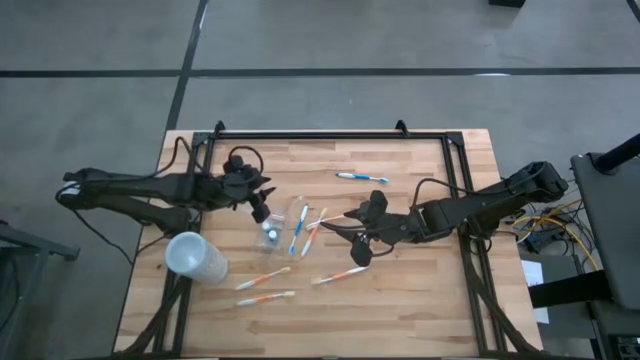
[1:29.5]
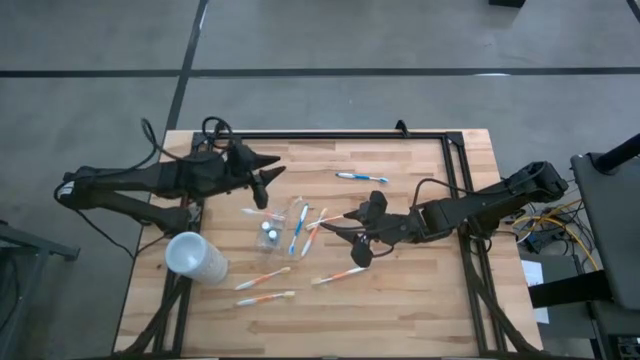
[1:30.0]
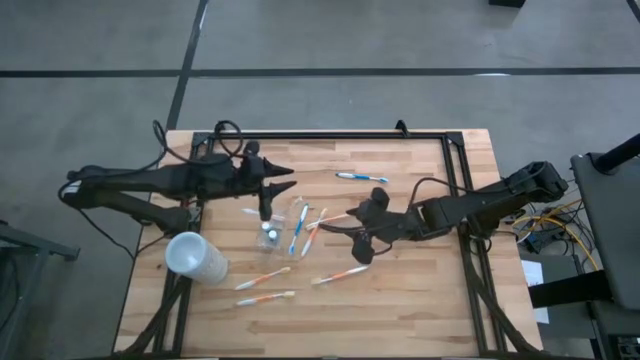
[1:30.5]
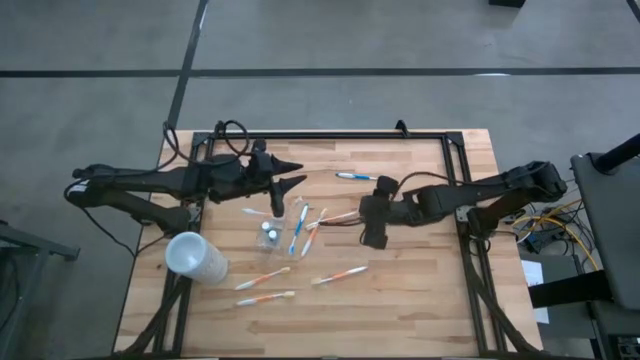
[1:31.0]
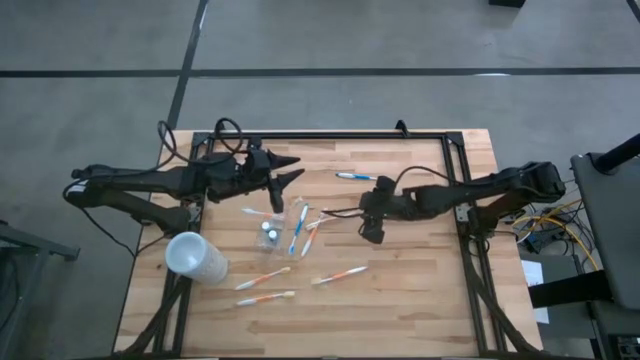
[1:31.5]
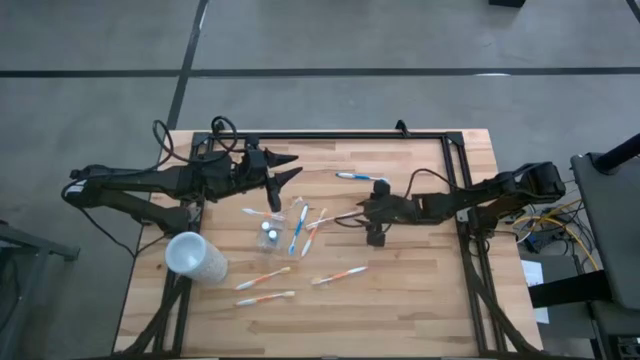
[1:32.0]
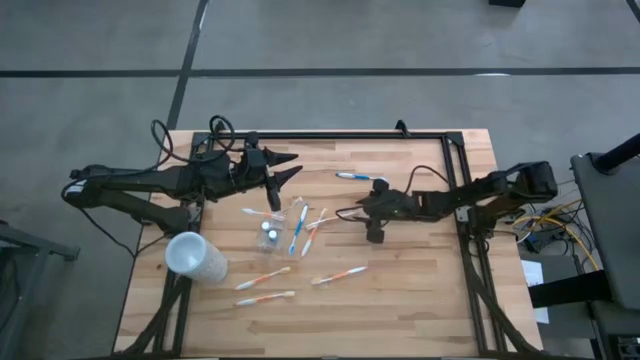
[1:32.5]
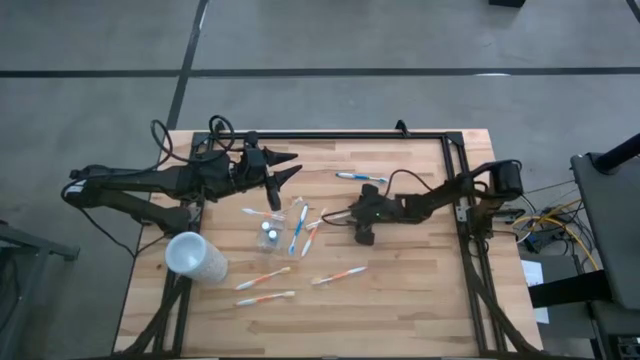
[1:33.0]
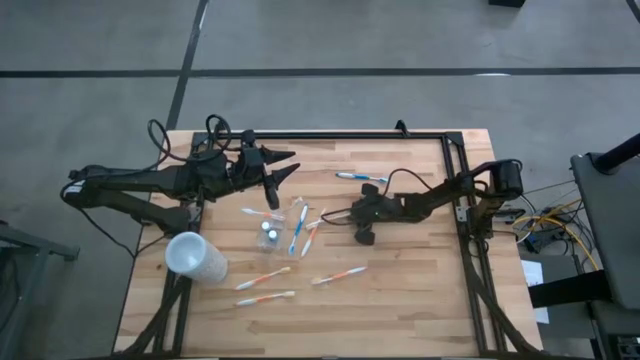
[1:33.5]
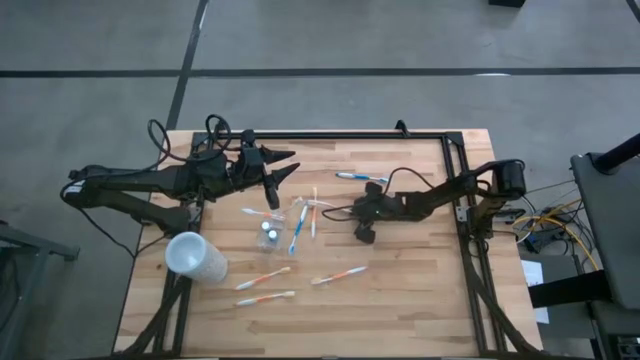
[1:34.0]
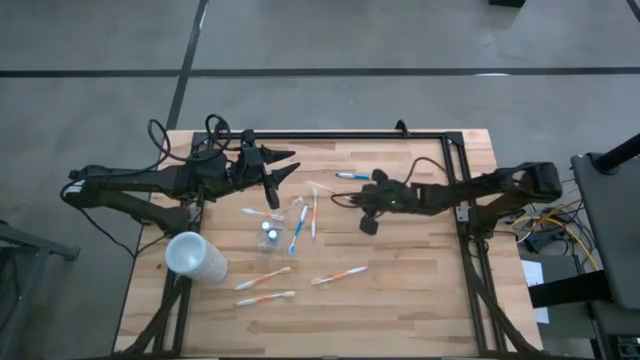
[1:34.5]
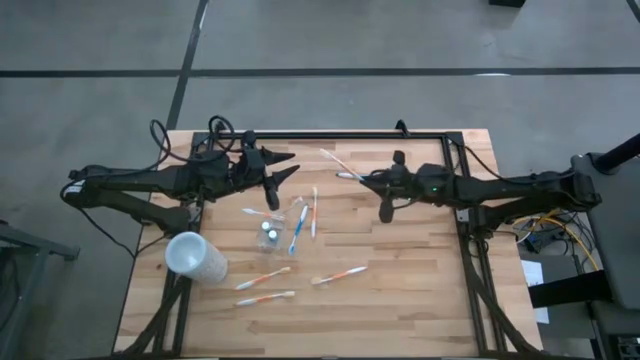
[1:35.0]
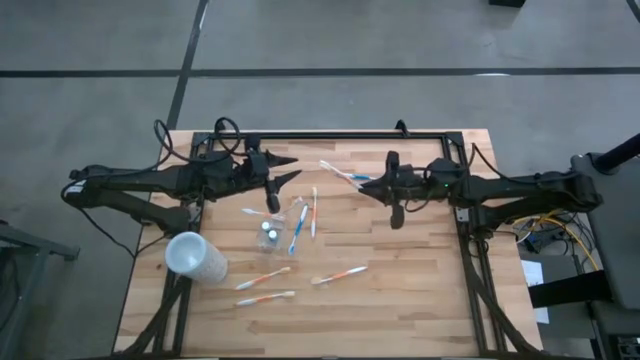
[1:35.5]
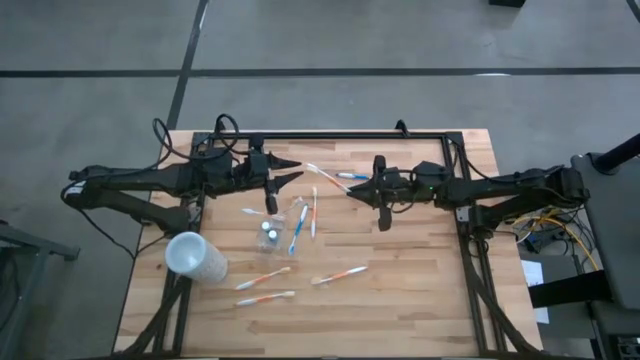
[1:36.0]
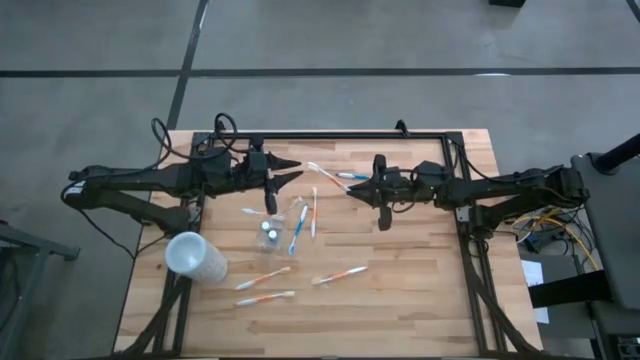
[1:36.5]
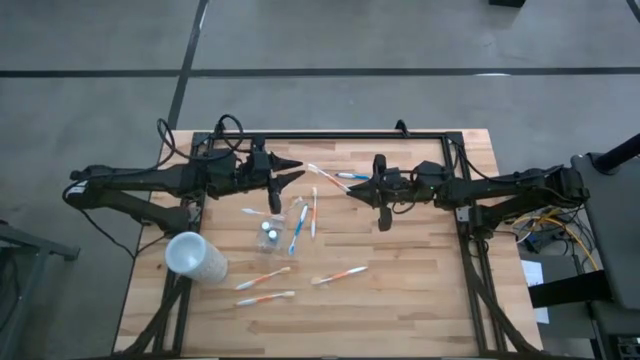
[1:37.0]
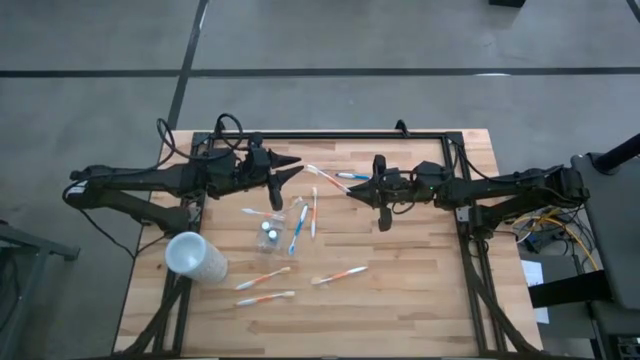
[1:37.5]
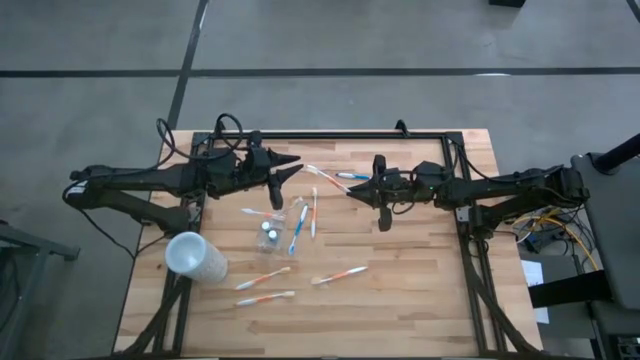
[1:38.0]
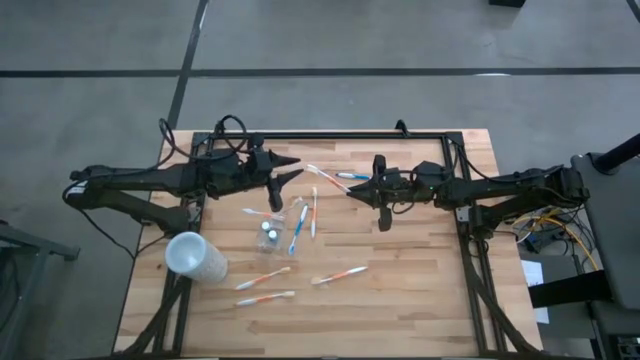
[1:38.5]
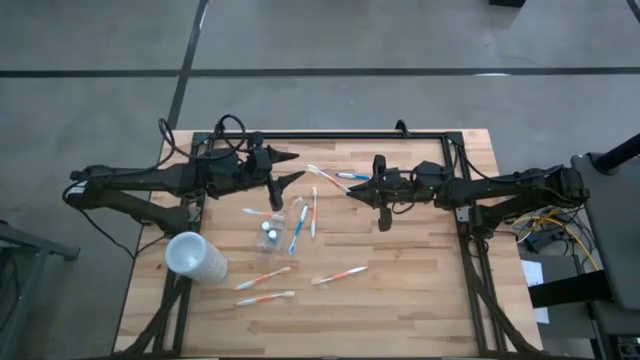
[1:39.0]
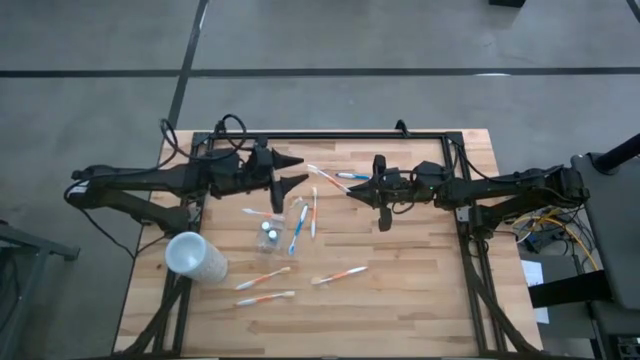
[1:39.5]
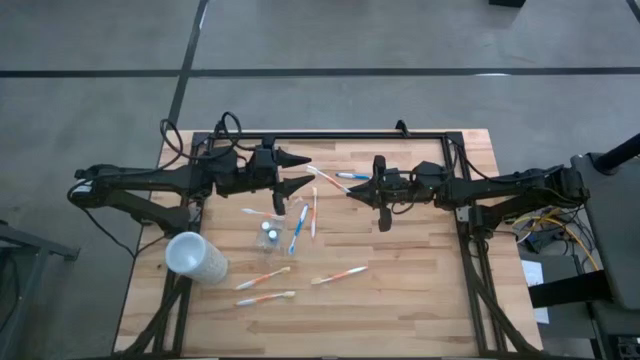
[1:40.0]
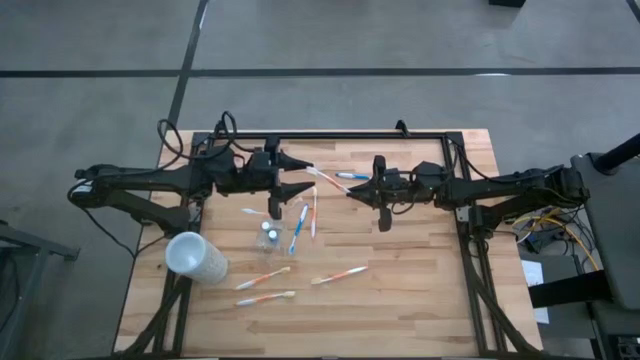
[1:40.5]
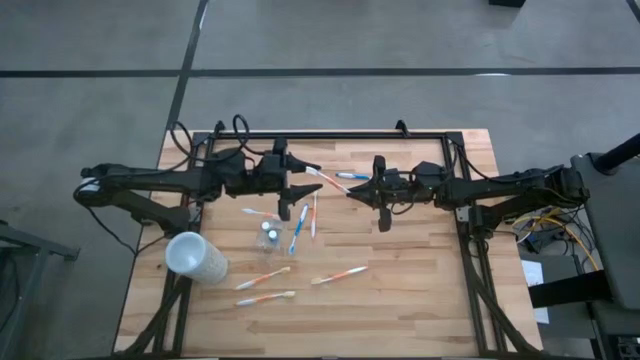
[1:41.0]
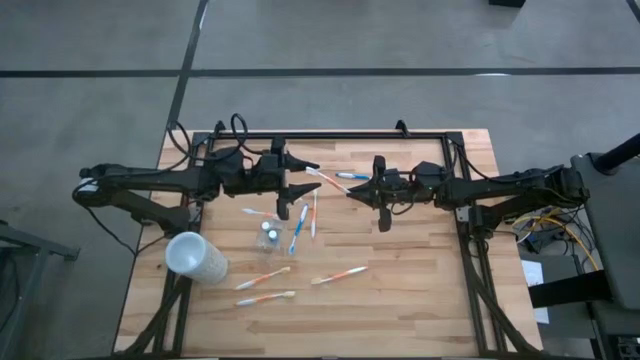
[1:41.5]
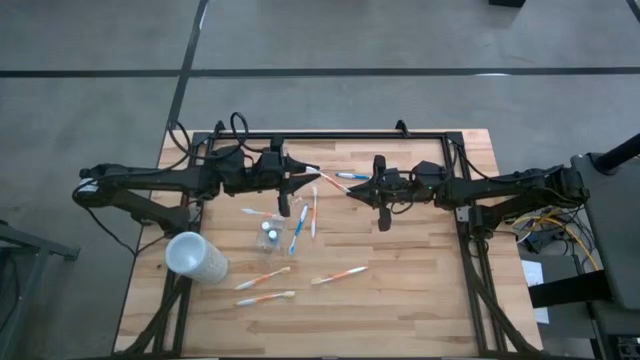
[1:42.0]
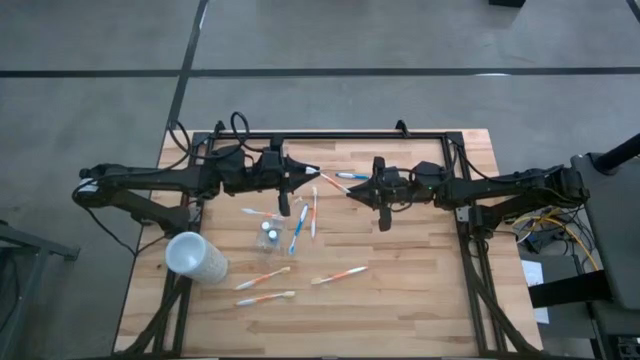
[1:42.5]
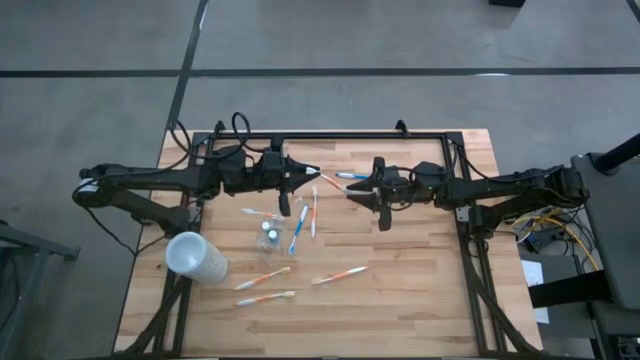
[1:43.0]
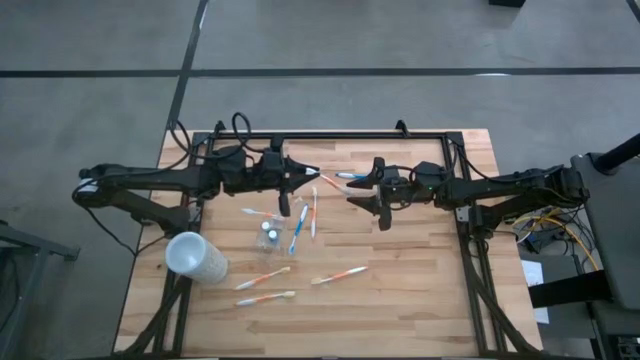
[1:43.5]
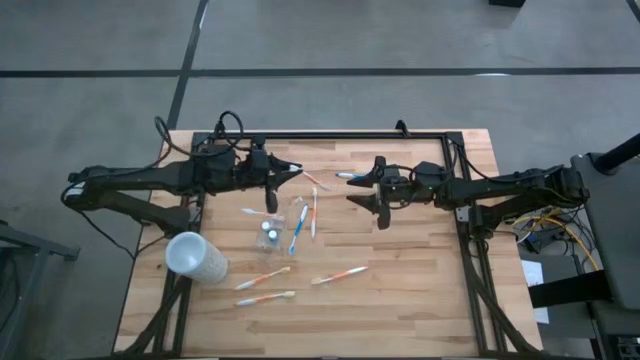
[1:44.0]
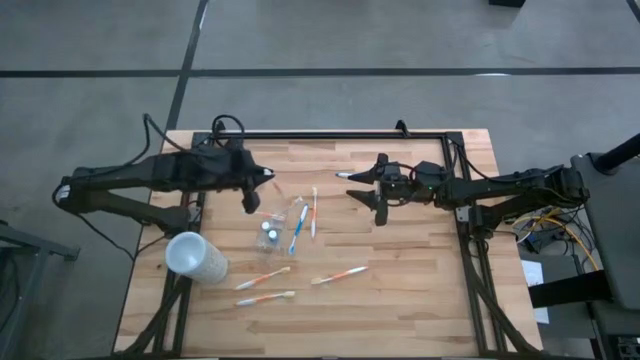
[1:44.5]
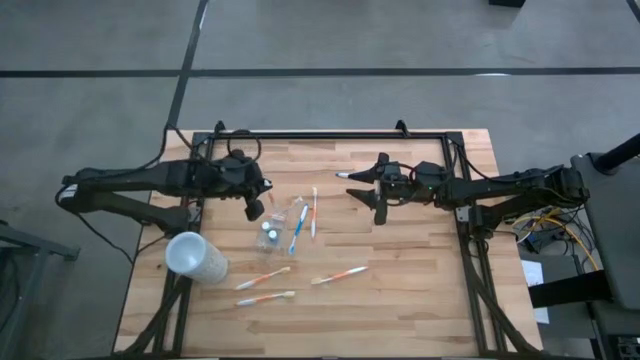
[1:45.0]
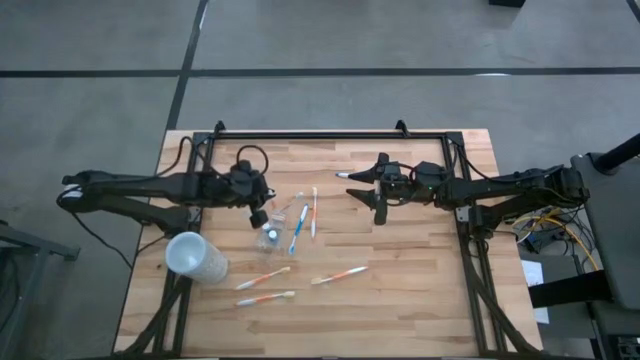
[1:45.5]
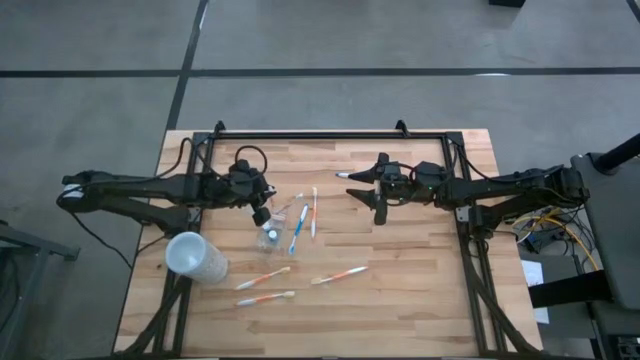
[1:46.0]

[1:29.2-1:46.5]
Task: Pick & Place toothbrushing station
Put the orange toothbrush into the transparent organizer

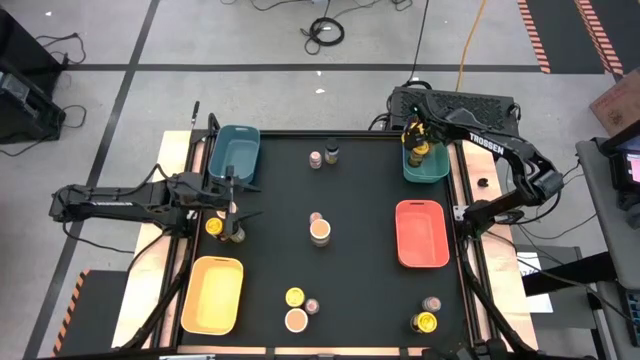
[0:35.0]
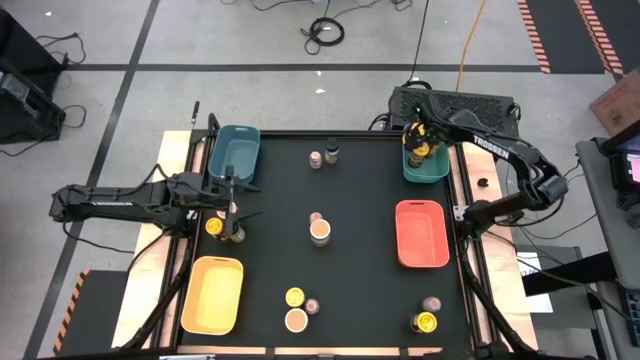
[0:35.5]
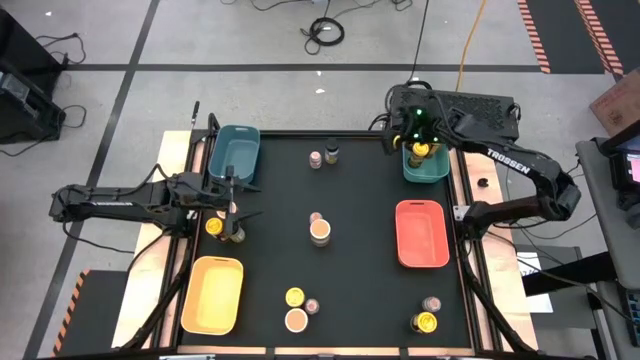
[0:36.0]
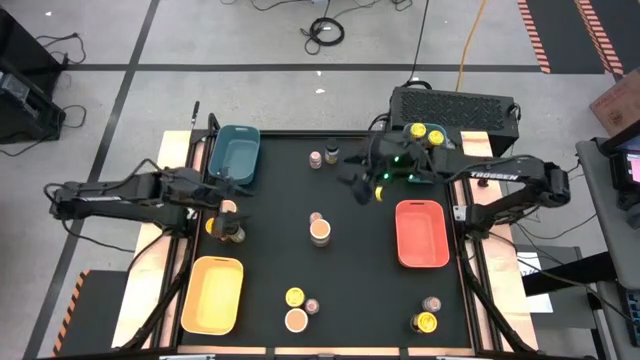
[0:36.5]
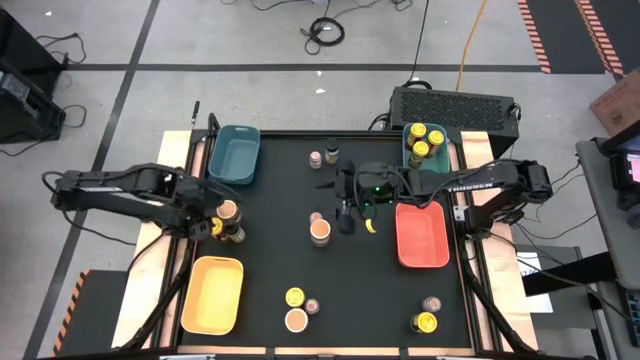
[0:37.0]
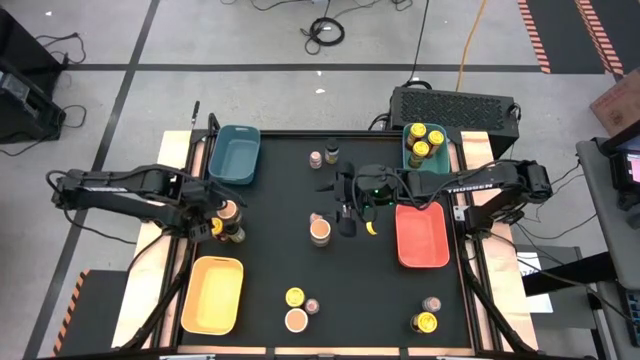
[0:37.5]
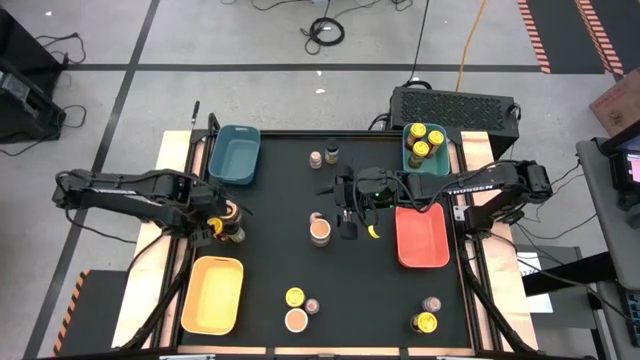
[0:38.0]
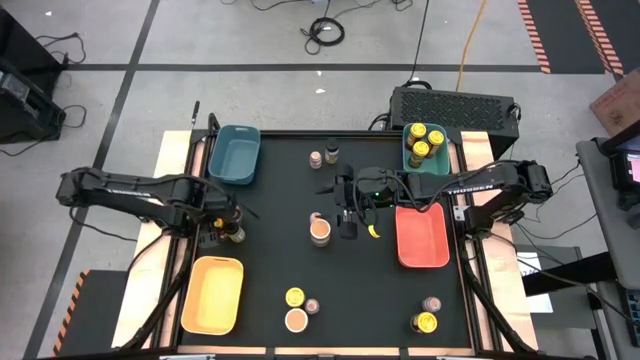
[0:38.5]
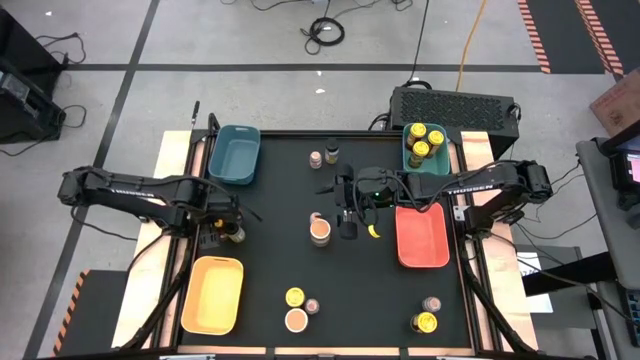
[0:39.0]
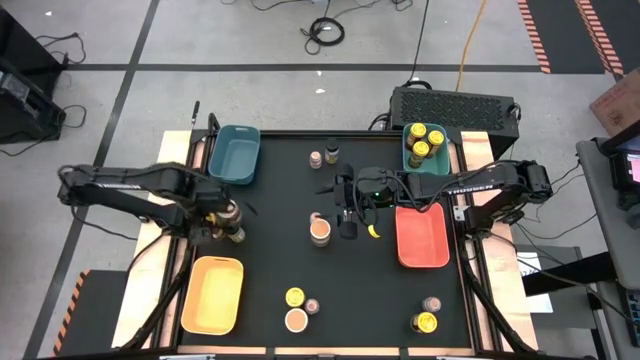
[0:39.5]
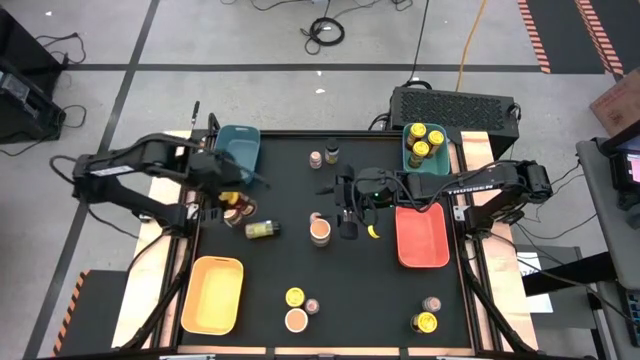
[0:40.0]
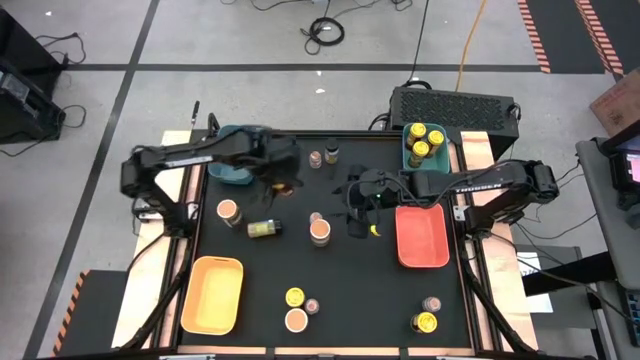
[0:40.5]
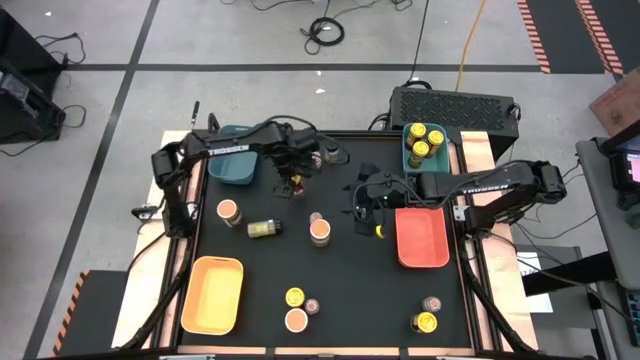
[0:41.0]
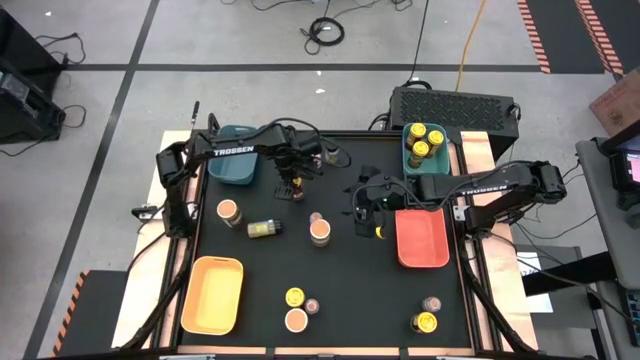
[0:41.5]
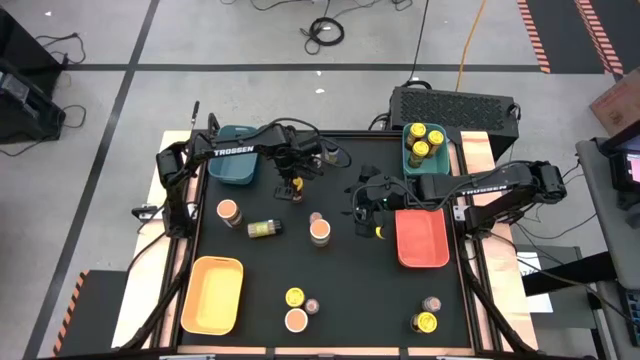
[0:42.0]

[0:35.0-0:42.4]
Task: Sort spices by type
Move the yellow spice bottle to the center of the table
